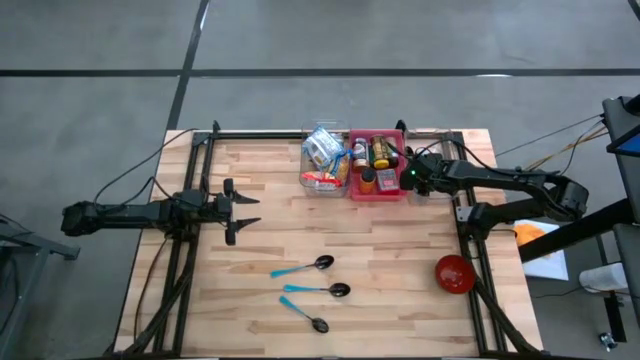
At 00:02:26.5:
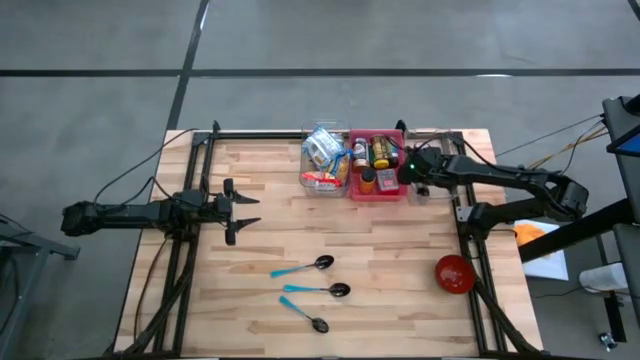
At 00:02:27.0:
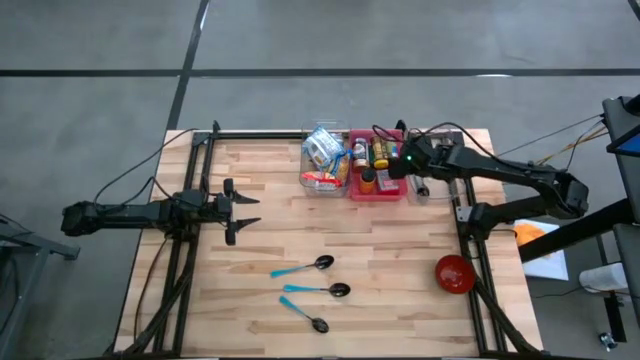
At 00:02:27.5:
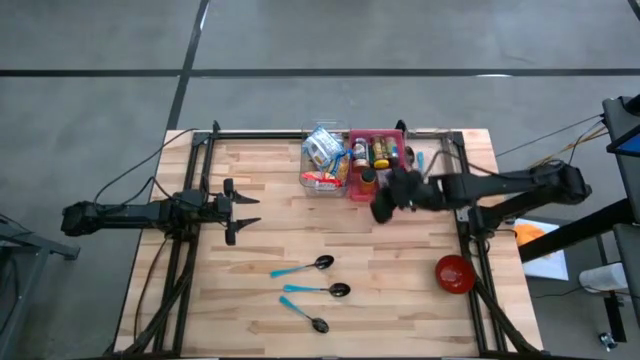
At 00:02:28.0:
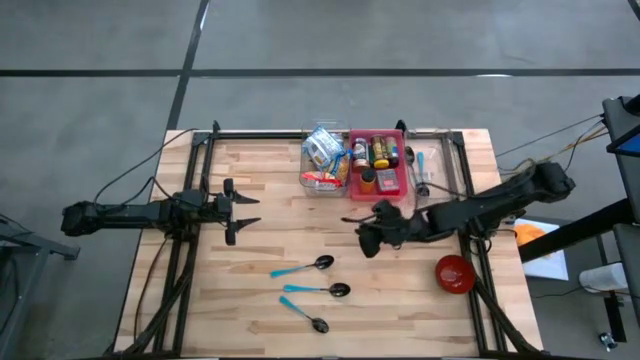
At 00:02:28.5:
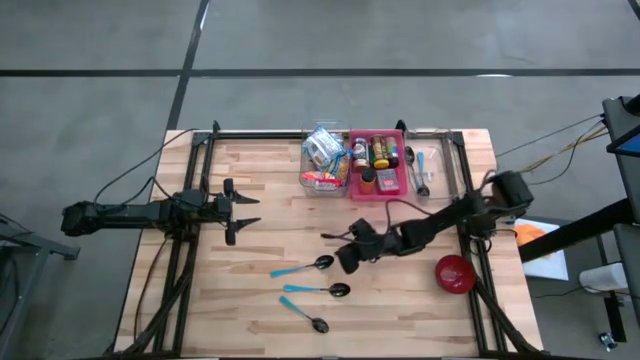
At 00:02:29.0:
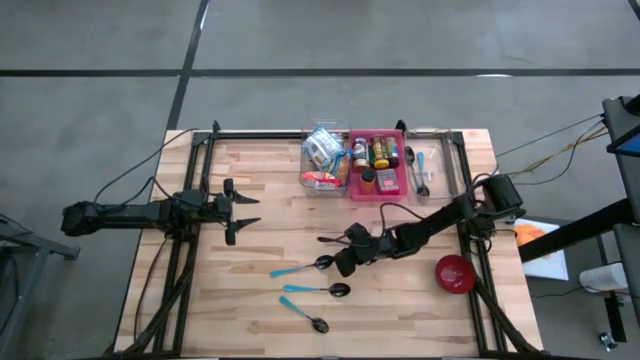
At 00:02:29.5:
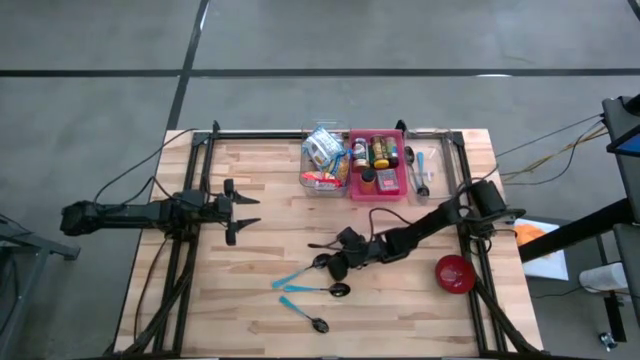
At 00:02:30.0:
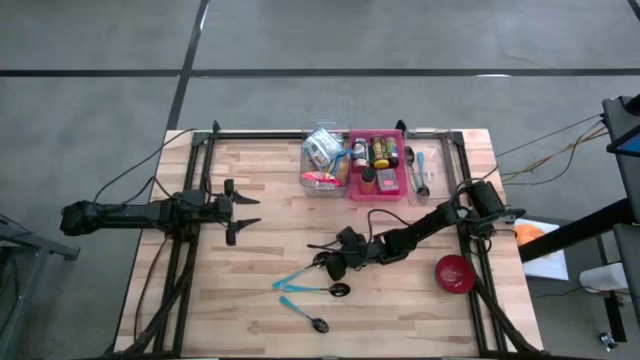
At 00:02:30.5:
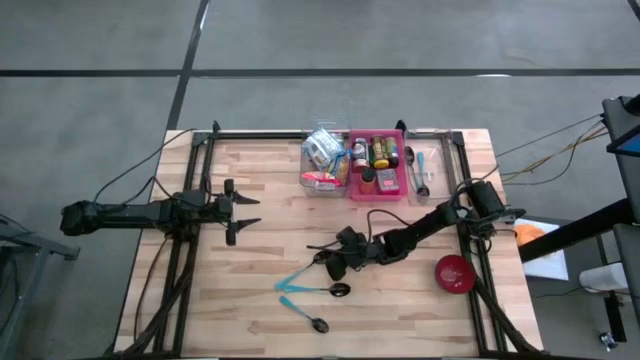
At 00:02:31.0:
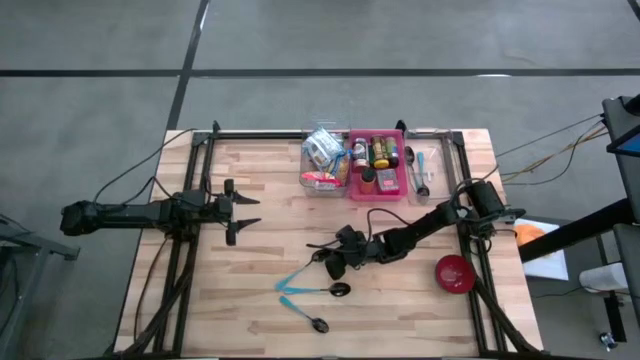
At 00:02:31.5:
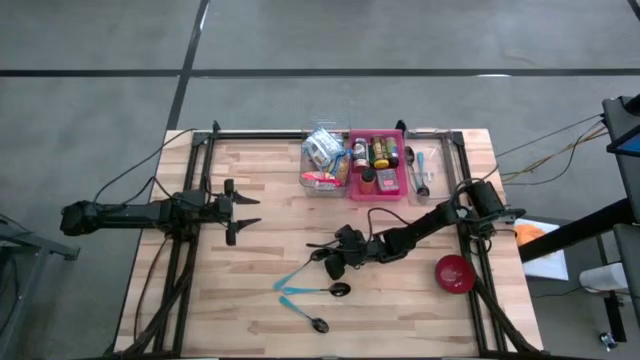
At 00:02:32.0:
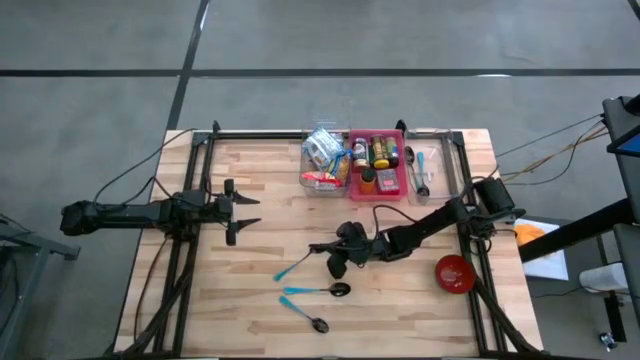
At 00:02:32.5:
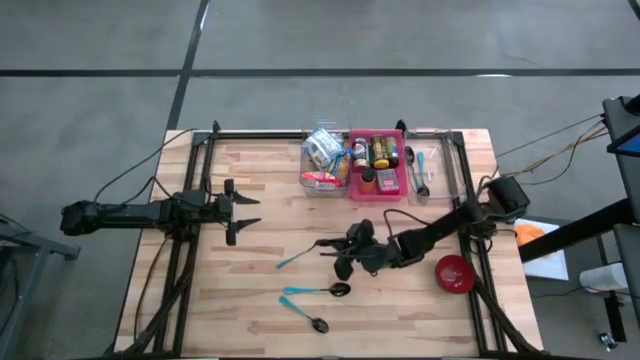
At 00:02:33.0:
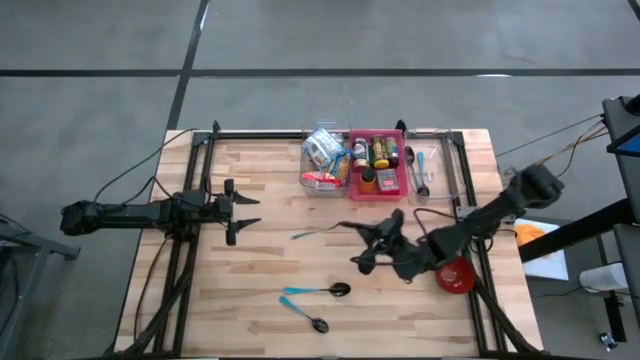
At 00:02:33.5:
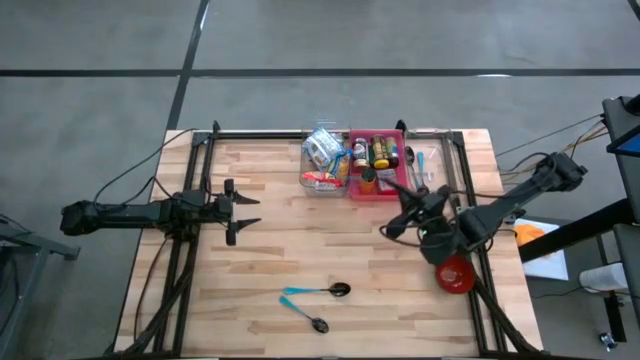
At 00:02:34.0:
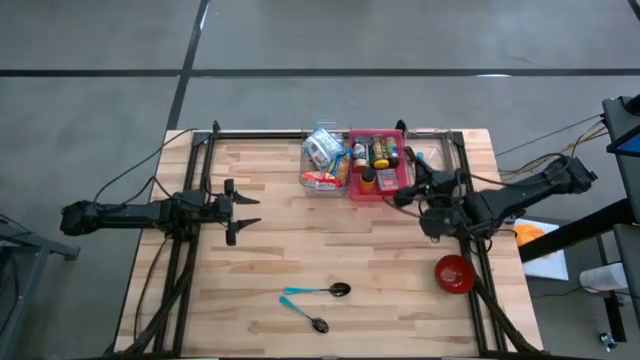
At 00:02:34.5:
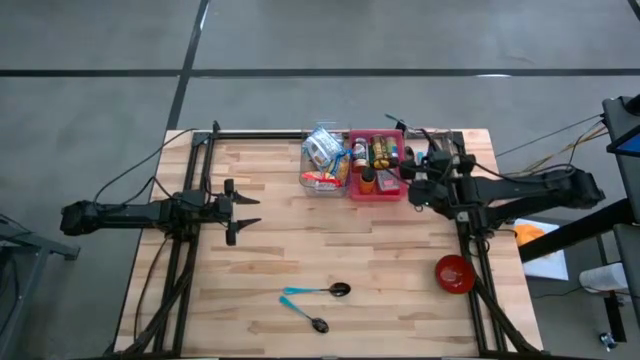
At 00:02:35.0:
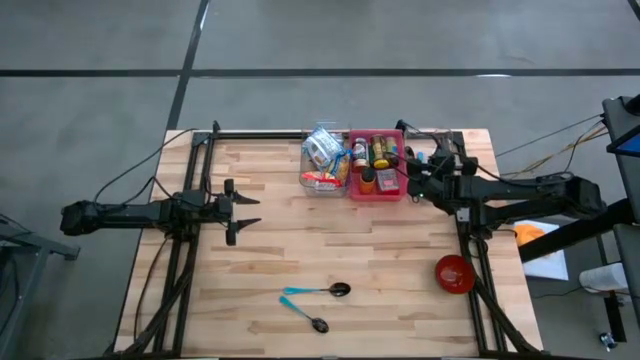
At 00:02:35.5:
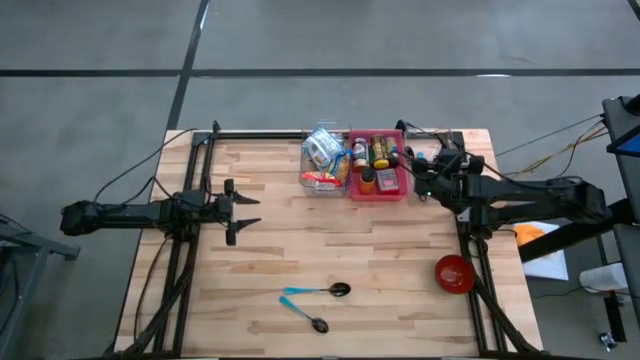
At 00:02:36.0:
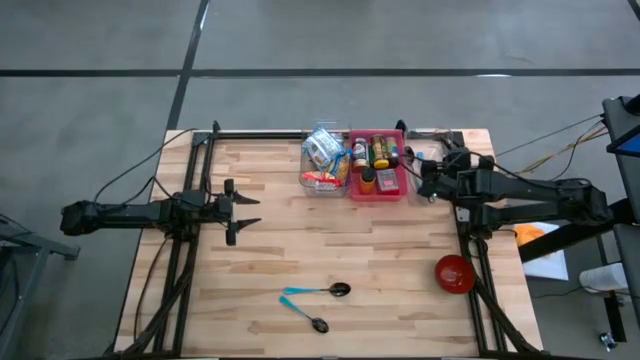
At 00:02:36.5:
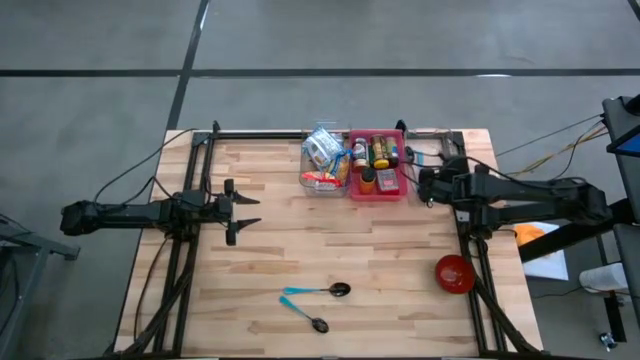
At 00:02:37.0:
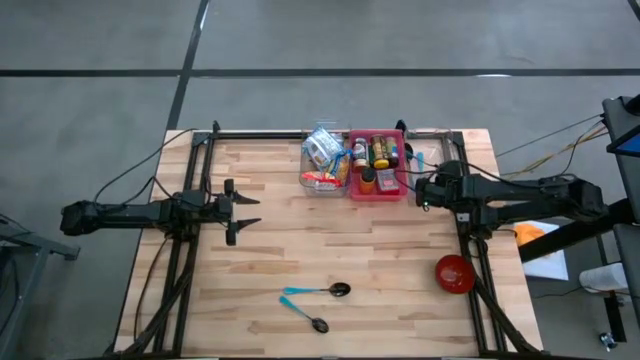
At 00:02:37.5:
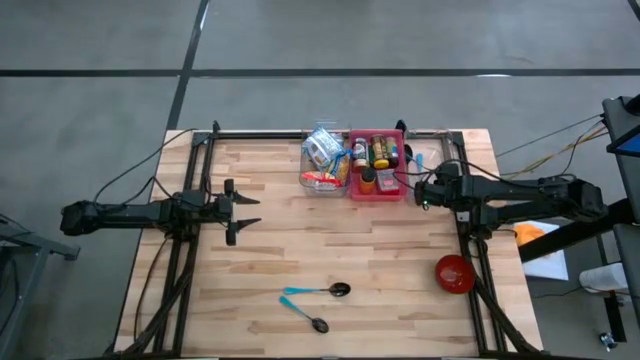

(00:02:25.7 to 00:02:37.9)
Put the blue spoon into the right transparent bin

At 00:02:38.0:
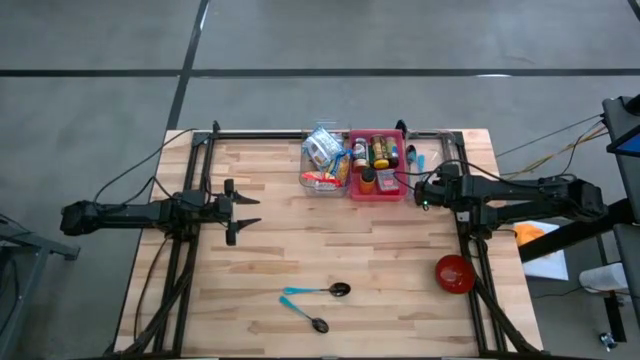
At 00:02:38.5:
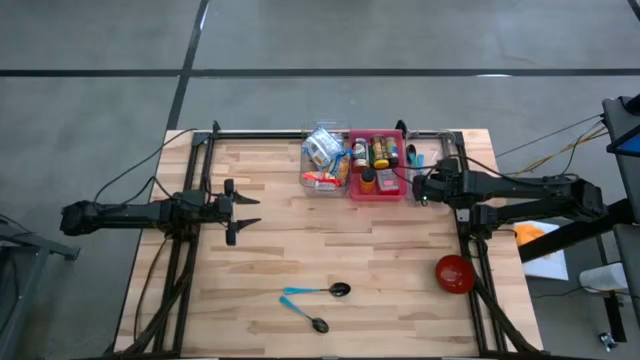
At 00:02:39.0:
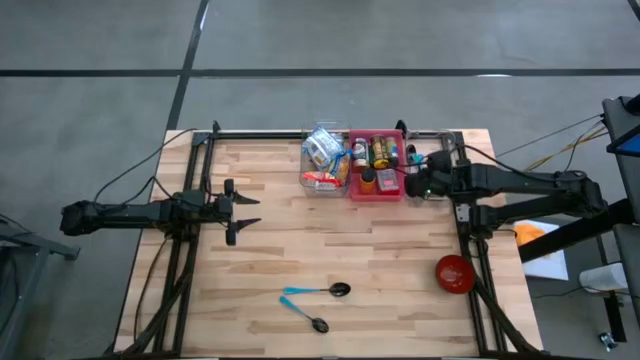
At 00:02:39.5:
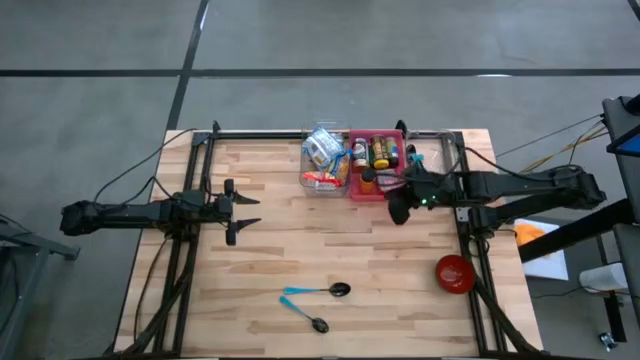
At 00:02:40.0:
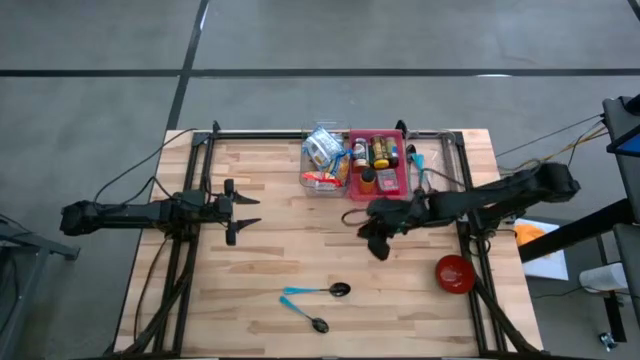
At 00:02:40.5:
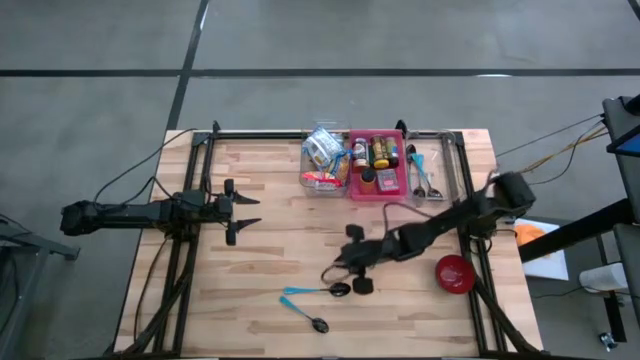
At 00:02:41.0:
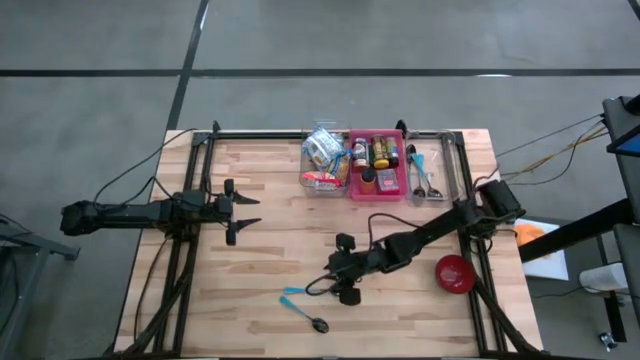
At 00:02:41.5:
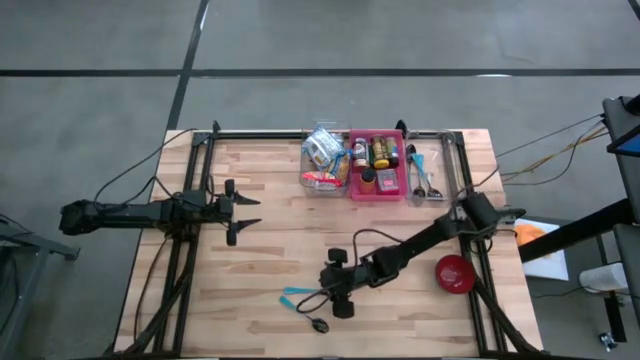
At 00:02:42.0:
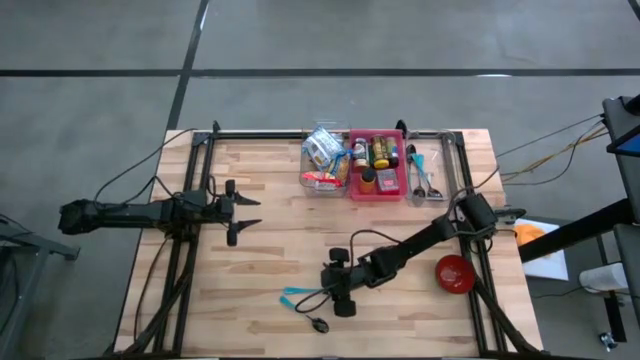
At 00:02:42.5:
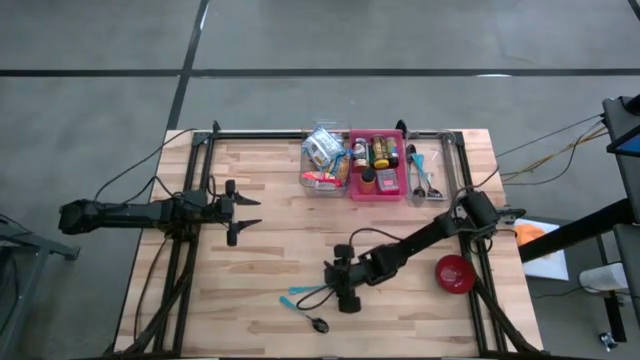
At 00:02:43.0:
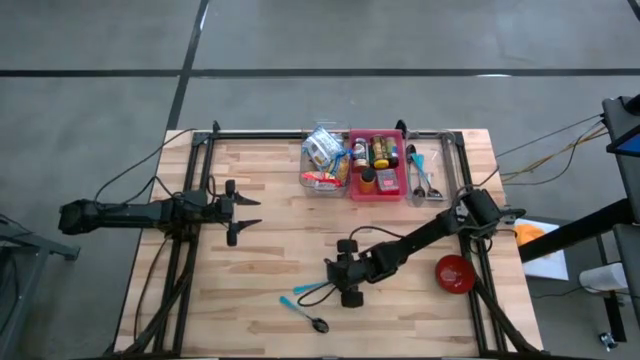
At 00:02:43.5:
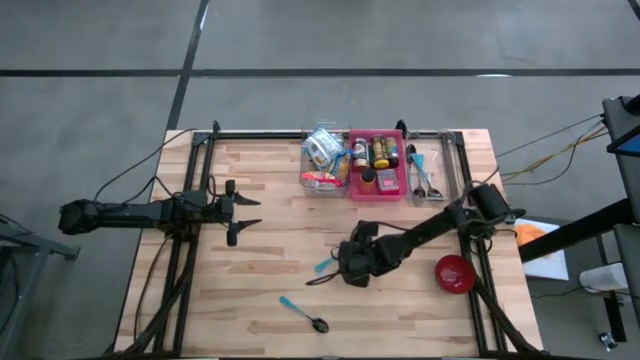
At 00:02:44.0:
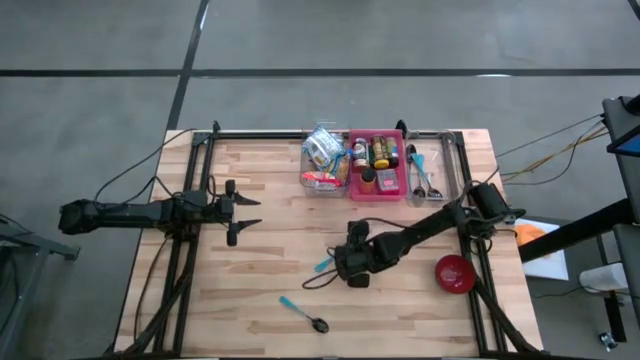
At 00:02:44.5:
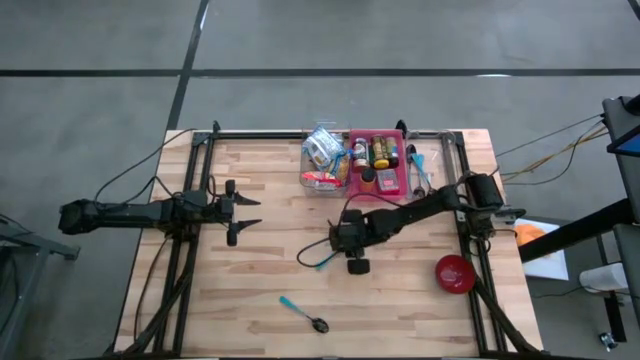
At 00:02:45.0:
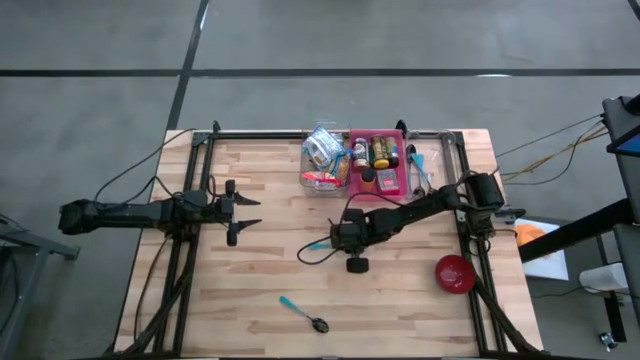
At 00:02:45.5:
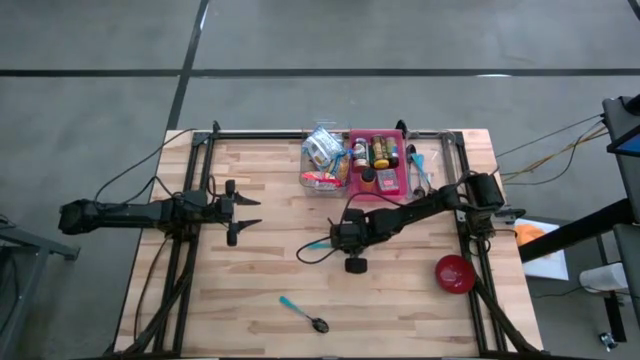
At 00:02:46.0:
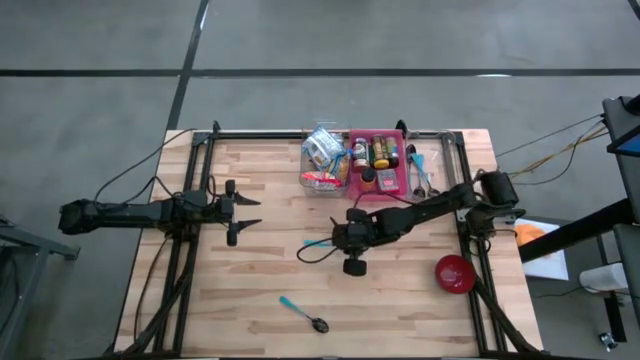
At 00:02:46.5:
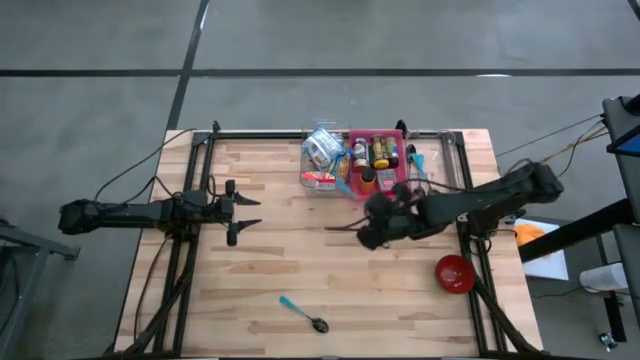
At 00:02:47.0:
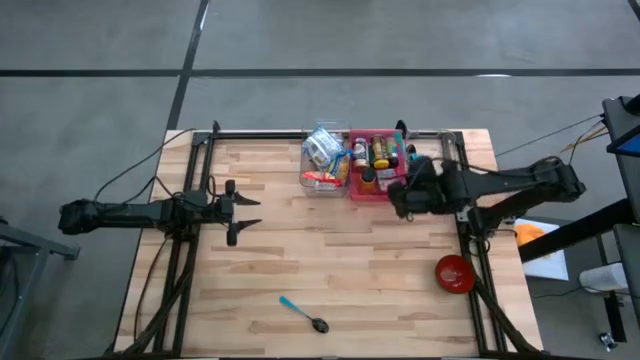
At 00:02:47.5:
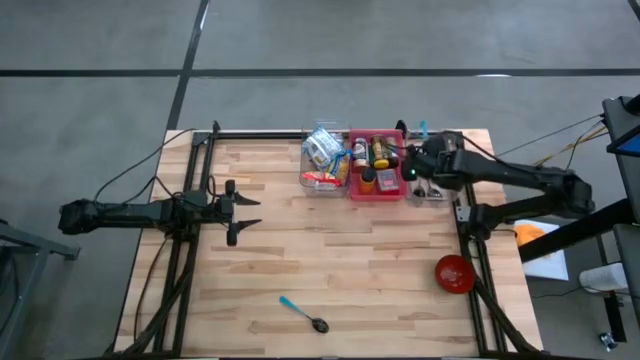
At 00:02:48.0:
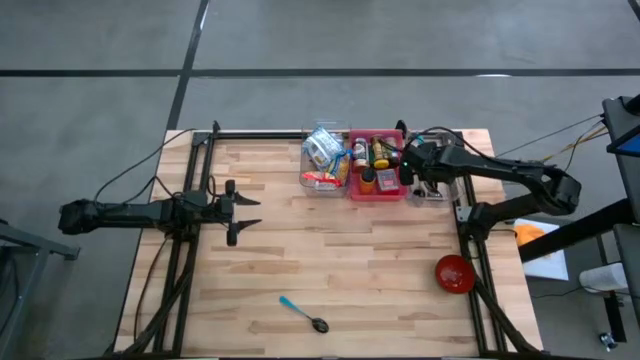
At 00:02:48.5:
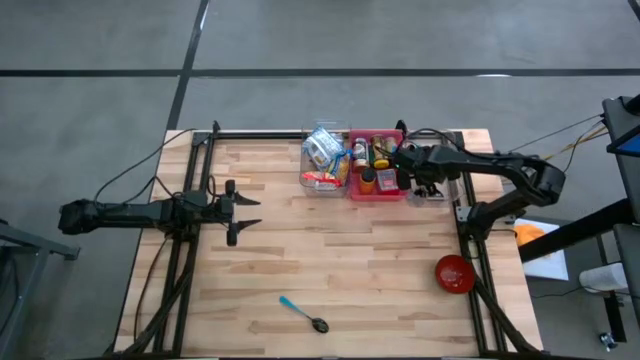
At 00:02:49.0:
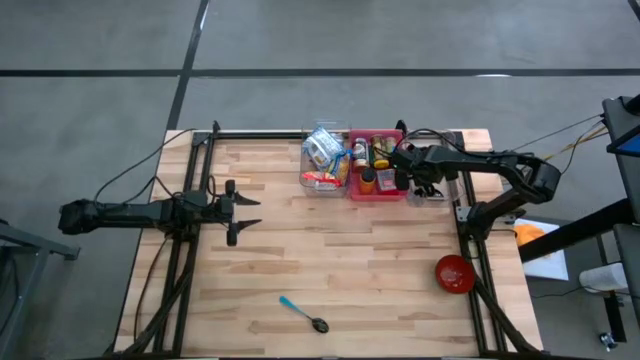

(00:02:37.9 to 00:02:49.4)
Put the blue spoon into the right transparent bin
